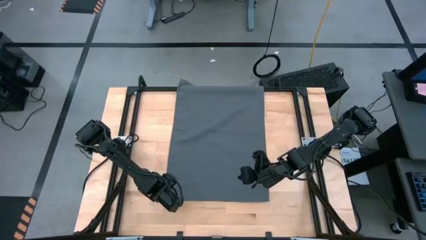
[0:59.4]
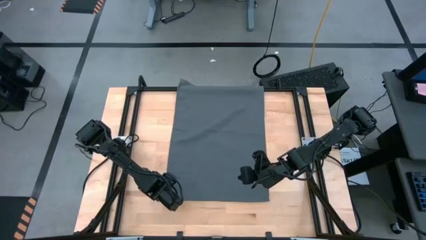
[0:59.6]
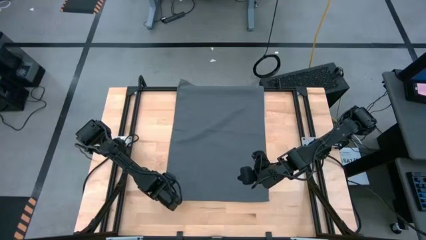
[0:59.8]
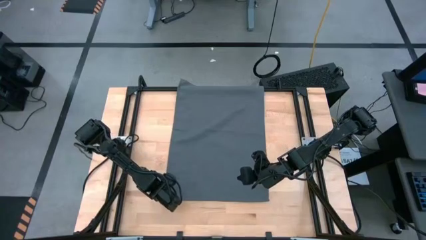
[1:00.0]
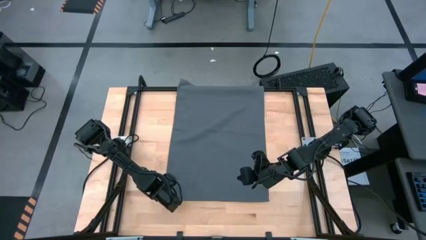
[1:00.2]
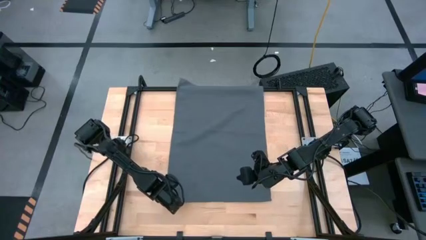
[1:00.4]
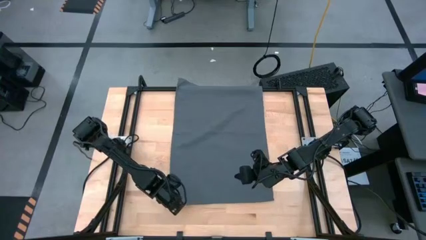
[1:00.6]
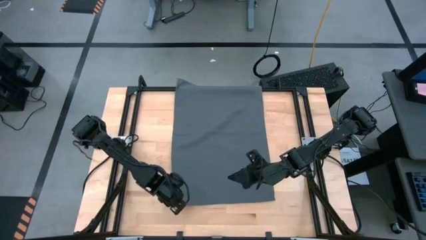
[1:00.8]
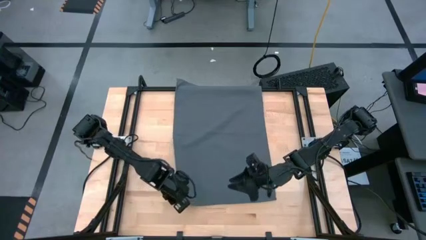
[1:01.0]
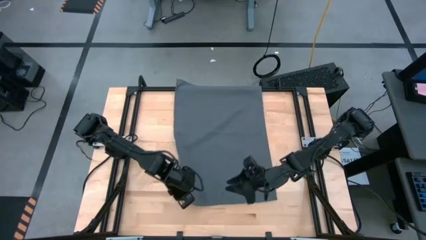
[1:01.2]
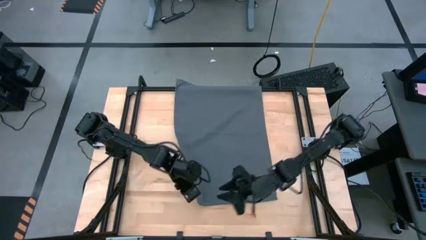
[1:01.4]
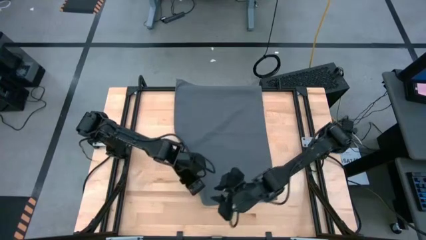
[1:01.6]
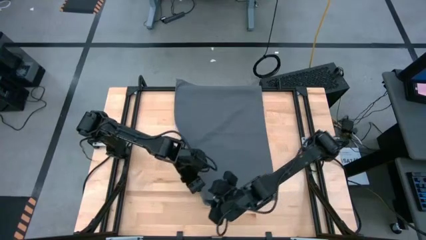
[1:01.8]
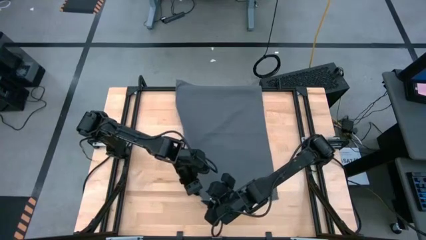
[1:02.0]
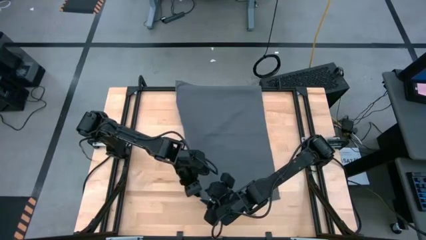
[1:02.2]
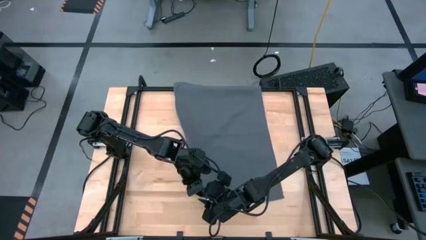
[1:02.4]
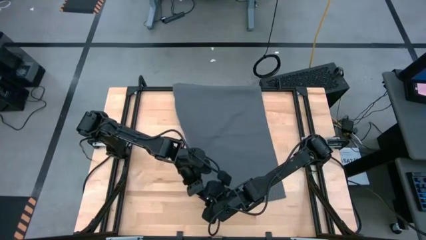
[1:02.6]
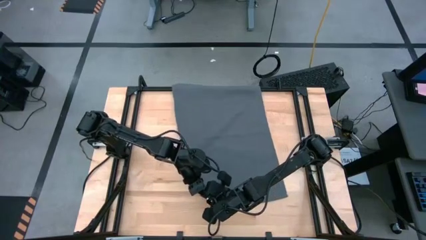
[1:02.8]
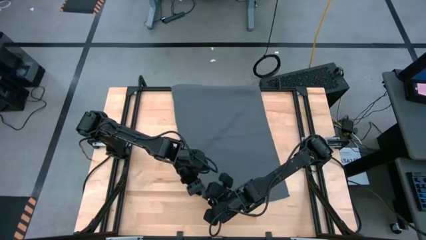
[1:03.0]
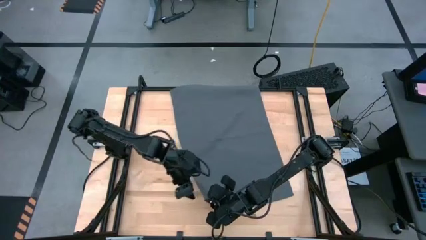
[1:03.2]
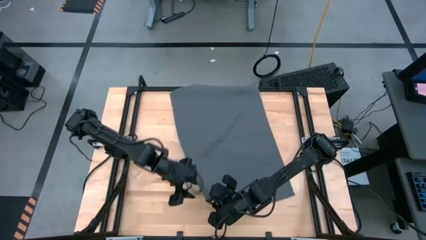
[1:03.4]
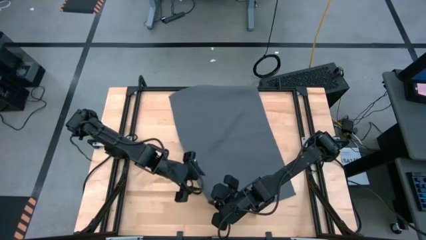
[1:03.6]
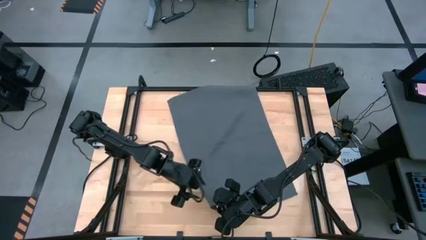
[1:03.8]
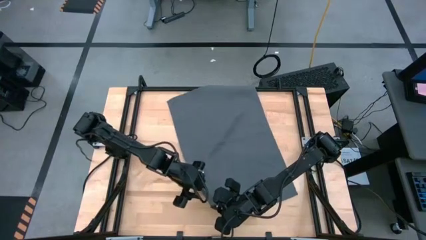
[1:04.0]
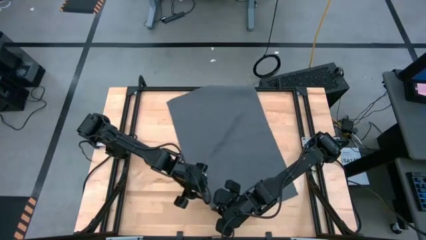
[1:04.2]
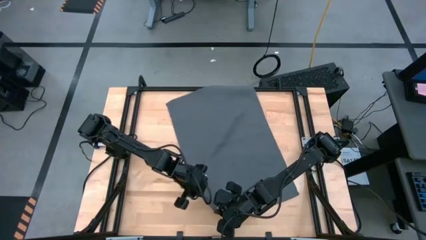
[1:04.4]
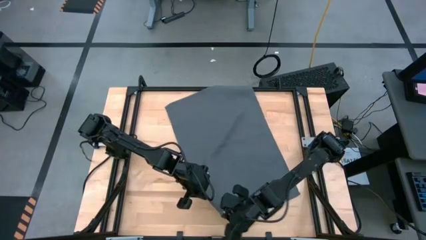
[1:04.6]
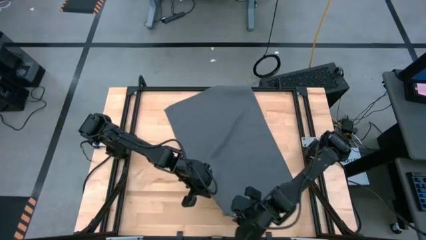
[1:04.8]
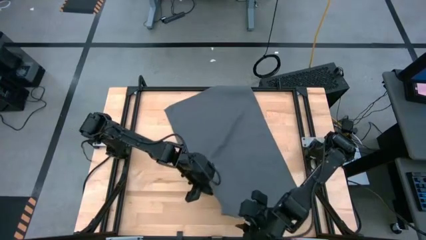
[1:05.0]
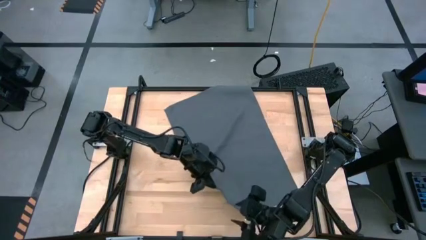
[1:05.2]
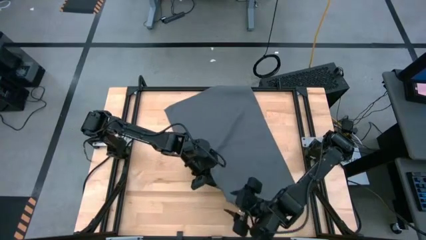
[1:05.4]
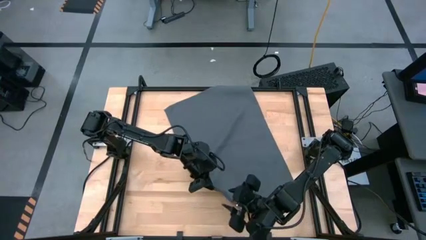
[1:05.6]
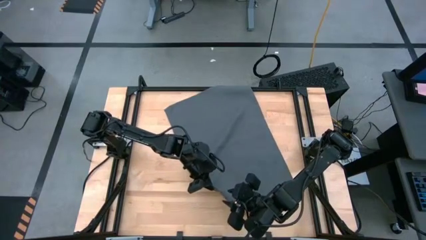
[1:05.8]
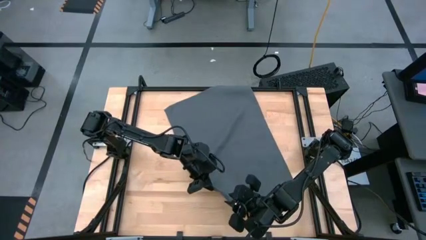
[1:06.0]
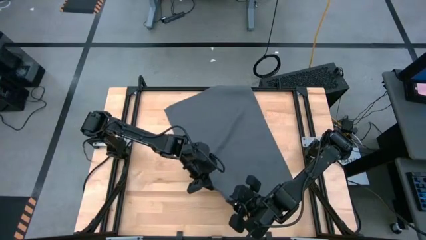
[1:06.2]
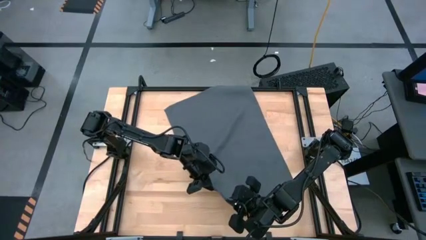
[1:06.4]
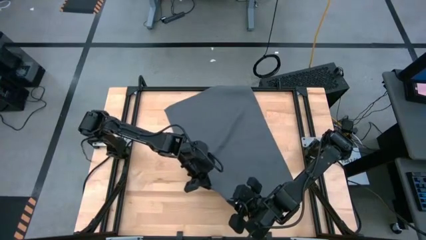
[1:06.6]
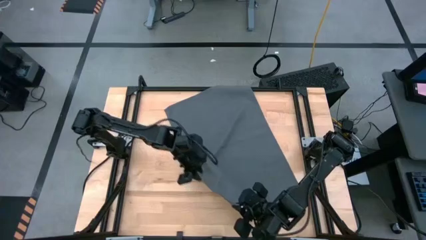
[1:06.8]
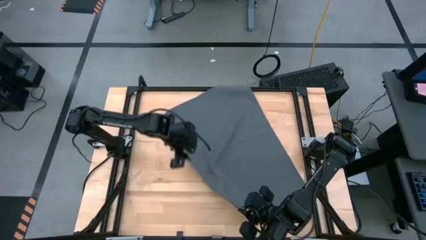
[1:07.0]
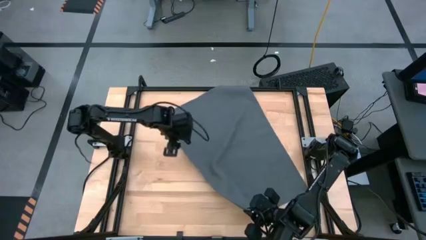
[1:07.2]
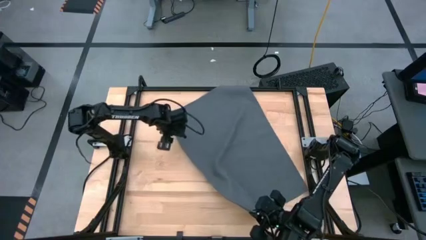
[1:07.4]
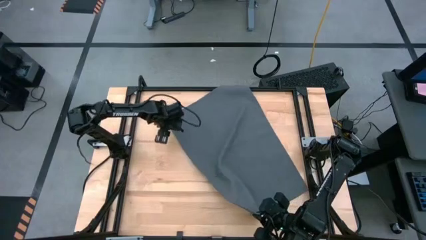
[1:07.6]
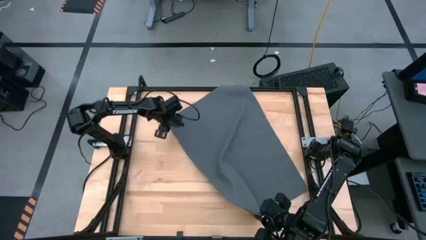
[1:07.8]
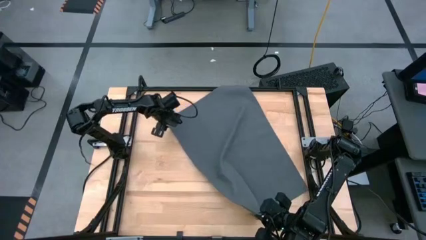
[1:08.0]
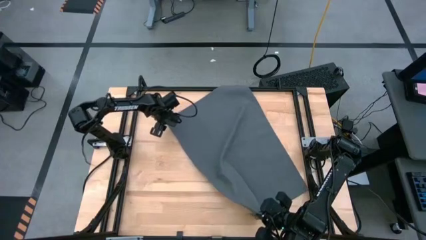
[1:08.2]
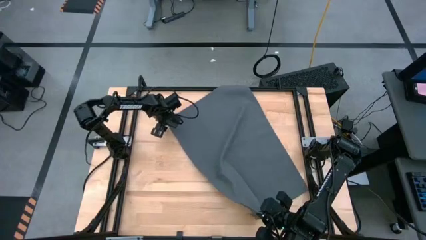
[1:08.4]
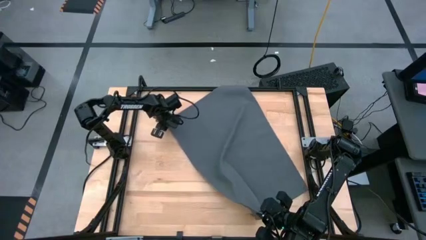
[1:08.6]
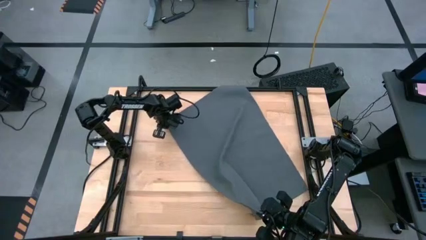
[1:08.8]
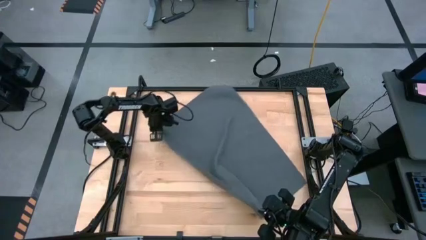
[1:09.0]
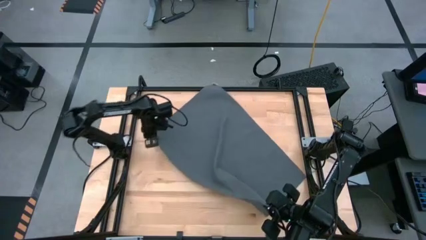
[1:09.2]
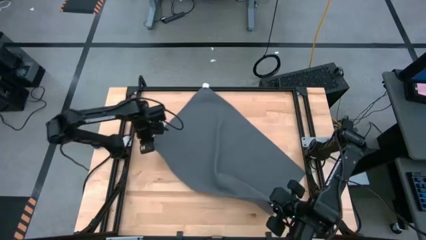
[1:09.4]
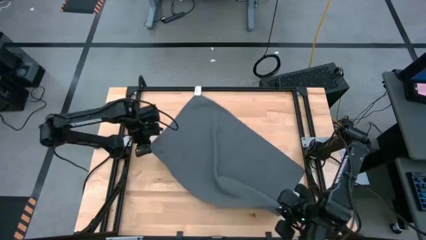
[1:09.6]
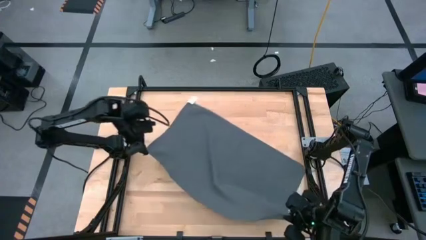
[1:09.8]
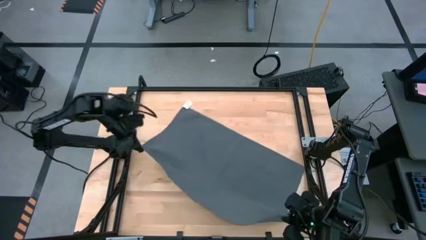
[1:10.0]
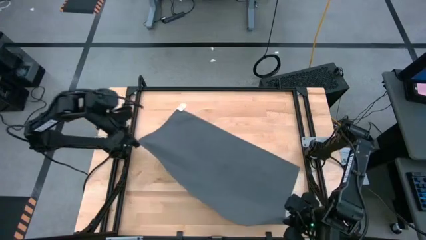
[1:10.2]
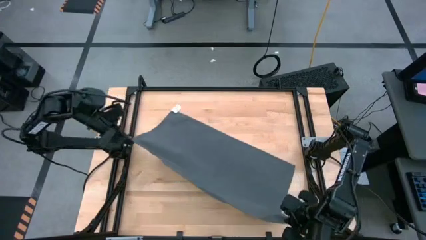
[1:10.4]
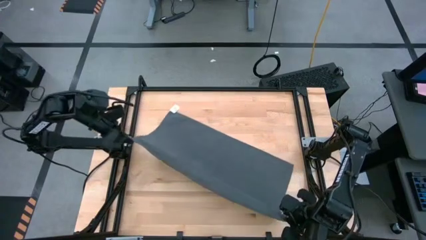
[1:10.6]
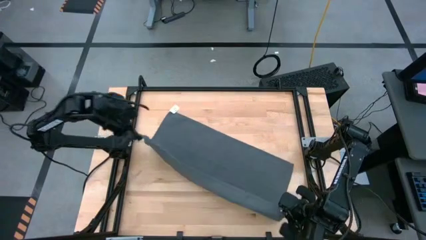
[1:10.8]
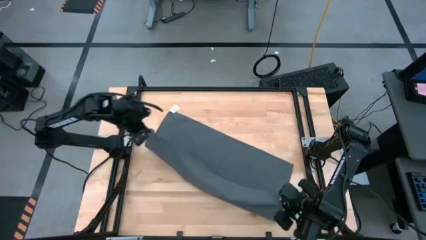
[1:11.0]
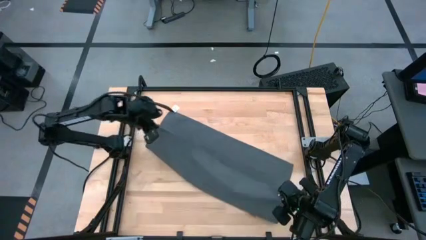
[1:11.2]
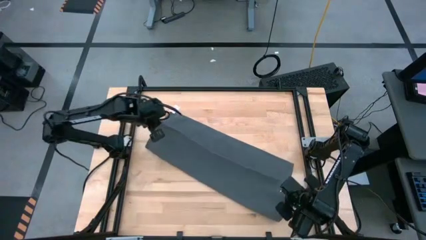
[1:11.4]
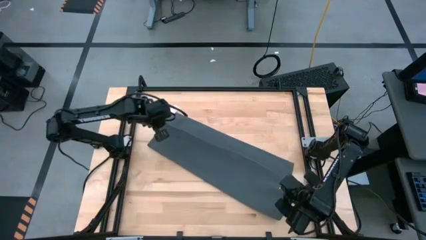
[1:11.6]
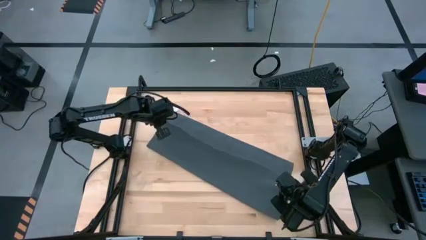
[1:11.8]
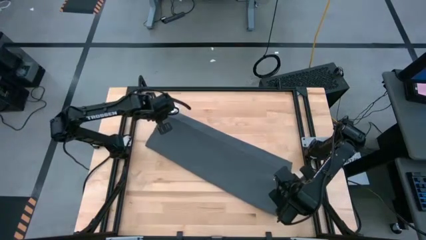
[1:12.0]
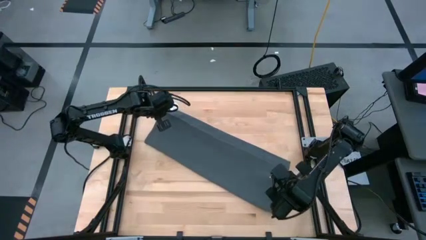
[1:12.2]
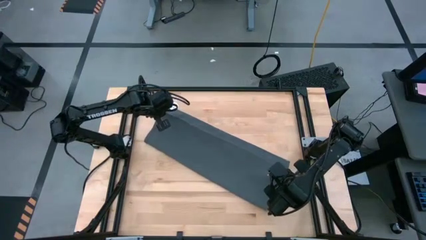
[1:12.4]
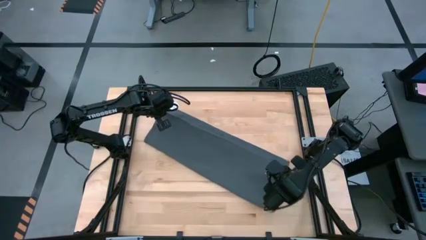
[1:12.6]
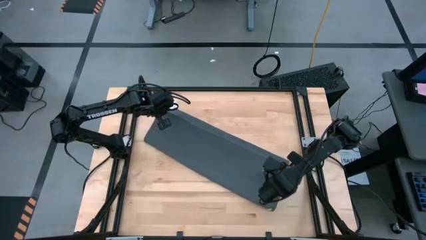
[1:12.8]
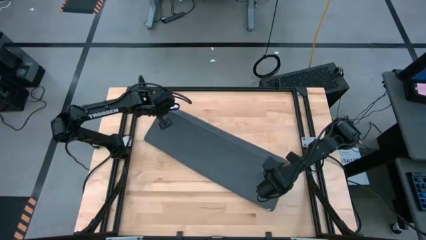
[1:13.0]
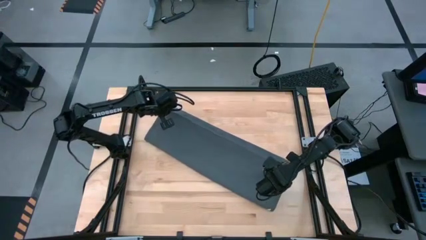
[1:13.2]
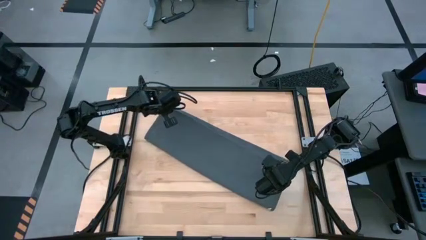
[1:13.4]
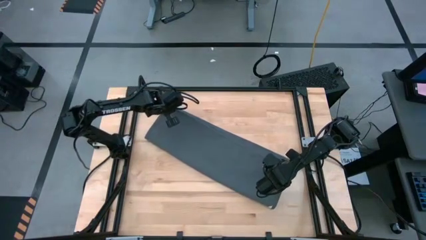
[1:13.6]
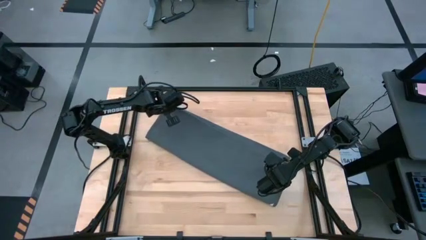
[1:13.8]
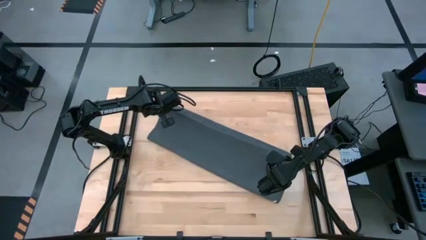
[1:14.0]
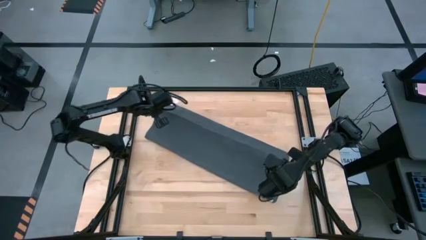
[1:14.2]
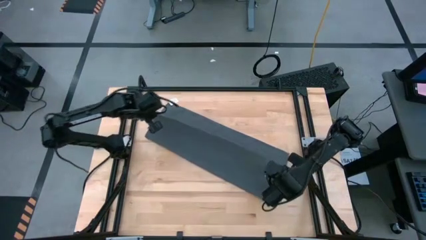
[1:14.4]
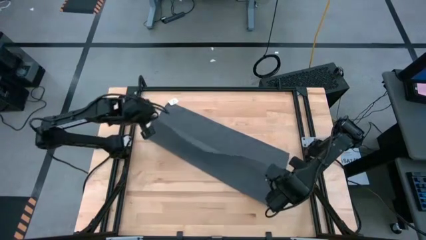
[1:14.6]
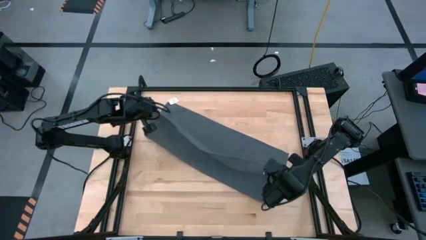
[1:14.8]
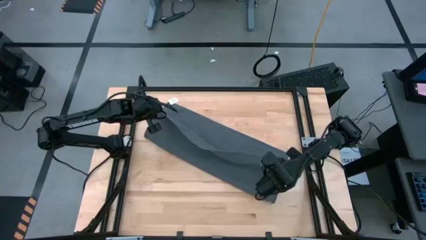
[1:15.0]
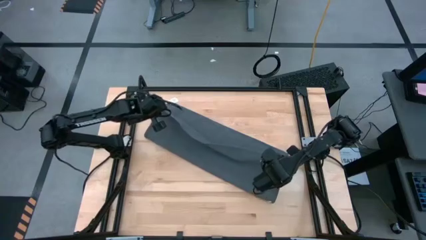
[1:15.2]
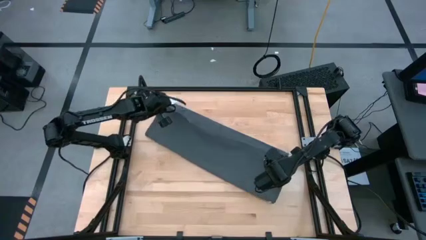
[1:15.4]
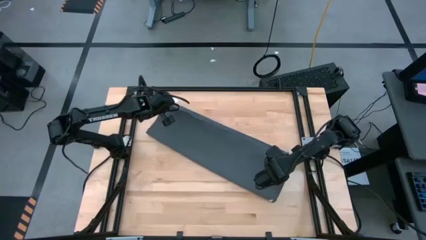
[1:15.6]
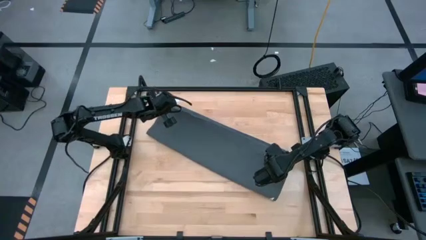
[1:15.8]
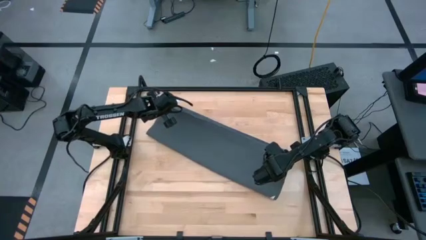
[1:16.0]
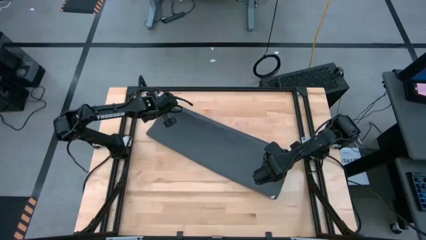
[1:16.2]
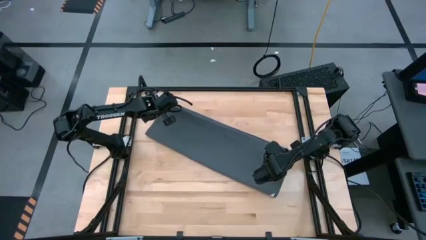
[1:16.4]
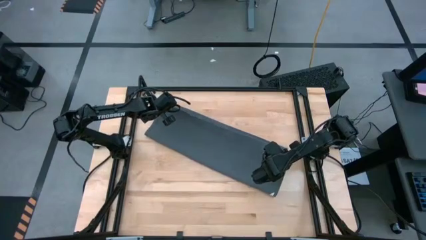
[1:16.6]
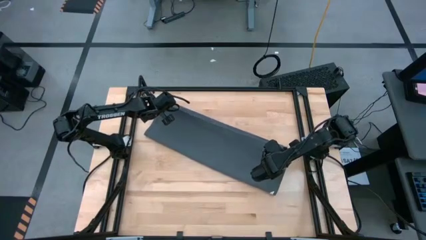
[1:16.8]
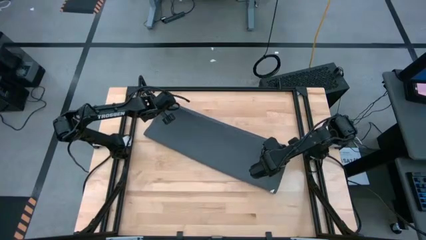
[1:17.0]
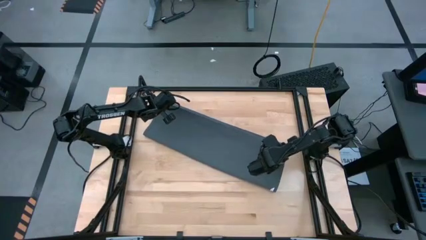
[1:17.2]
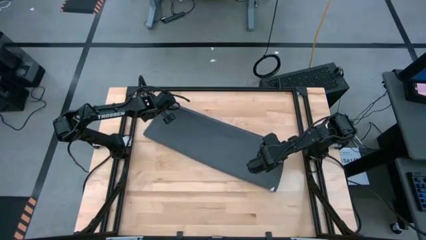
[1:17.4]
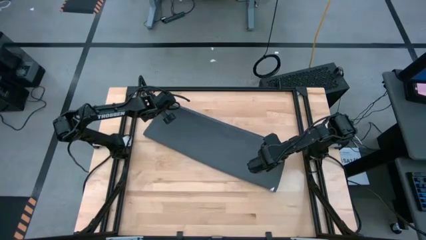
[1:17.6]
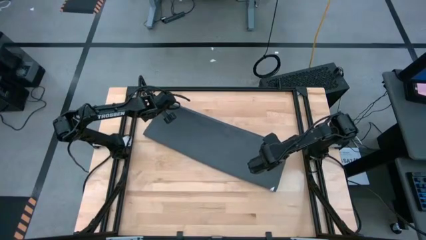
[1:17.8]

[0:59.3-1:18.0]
Task: Roll towel into tight, uniform cylinder
Roll the towel
